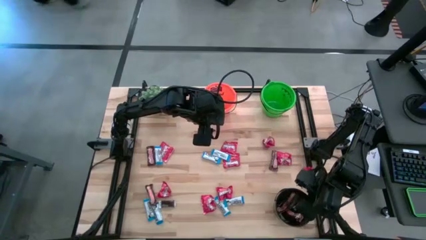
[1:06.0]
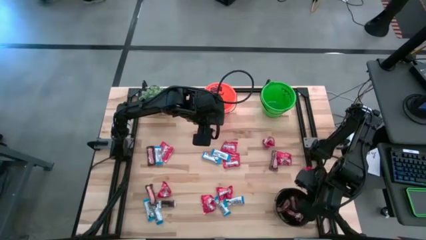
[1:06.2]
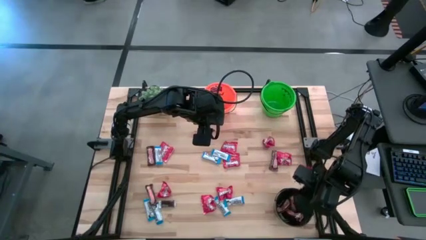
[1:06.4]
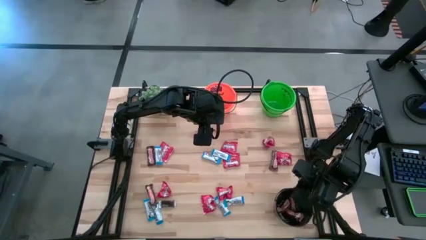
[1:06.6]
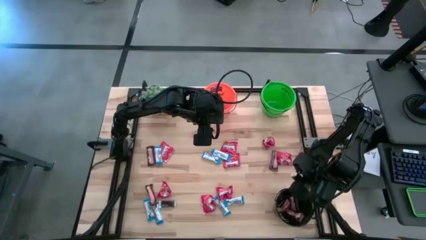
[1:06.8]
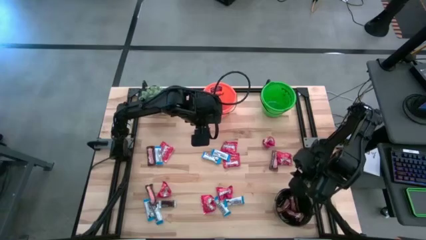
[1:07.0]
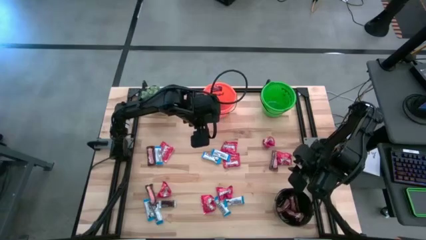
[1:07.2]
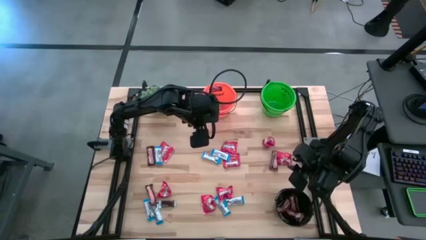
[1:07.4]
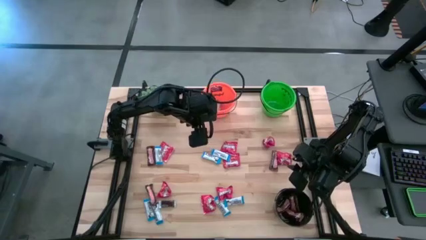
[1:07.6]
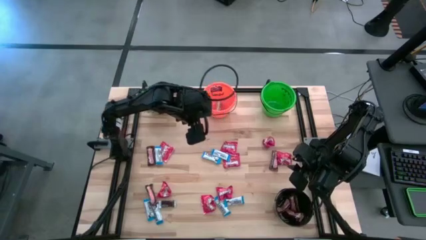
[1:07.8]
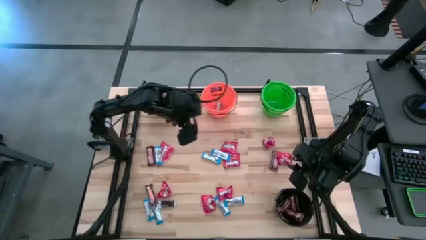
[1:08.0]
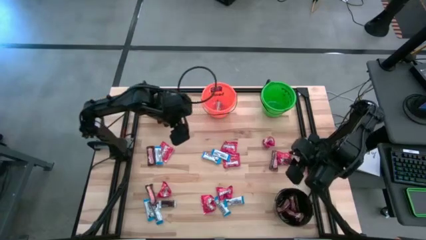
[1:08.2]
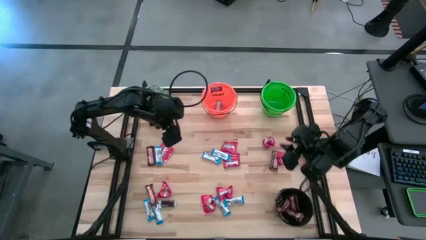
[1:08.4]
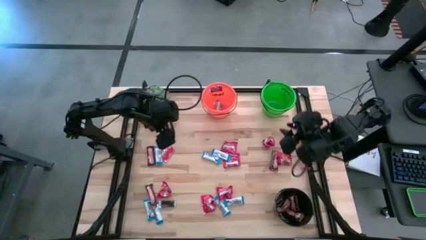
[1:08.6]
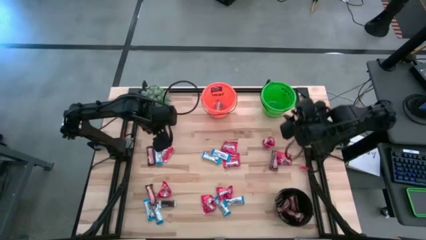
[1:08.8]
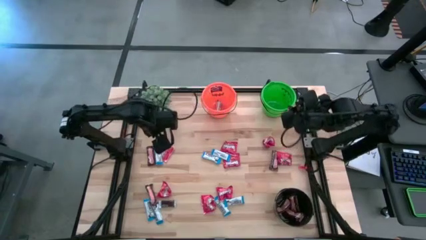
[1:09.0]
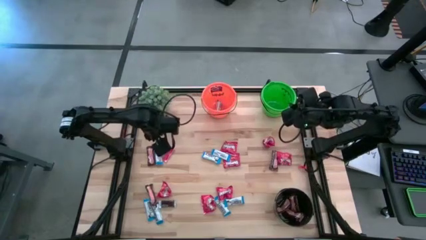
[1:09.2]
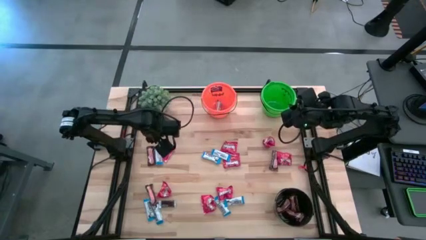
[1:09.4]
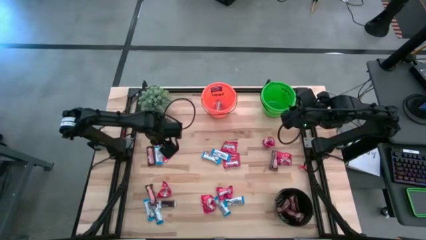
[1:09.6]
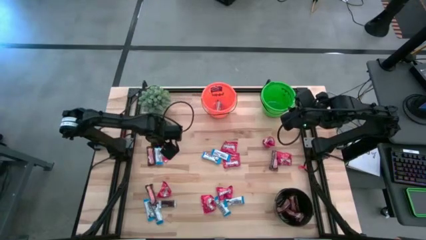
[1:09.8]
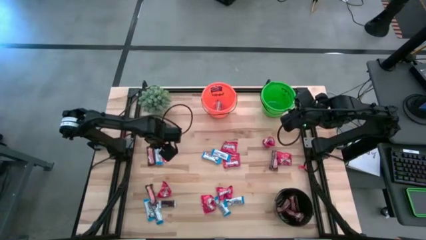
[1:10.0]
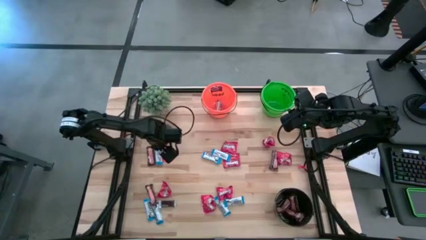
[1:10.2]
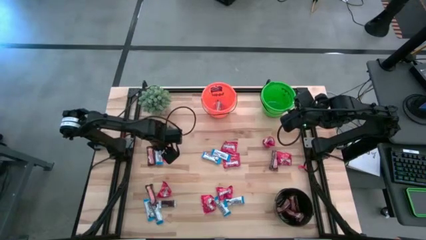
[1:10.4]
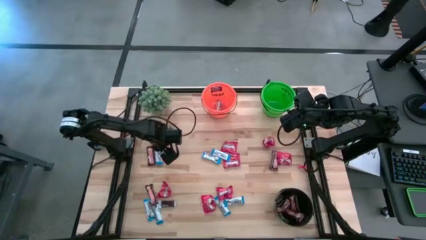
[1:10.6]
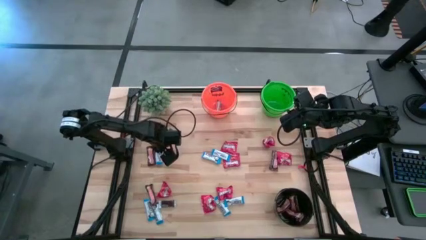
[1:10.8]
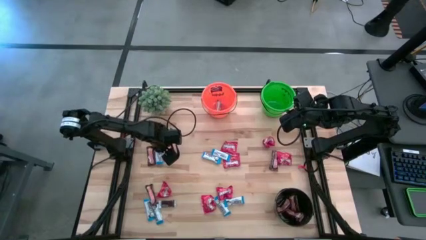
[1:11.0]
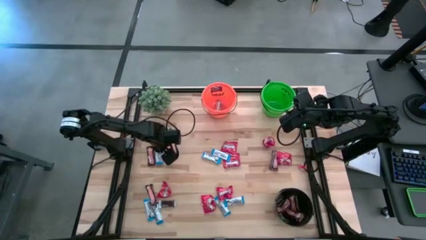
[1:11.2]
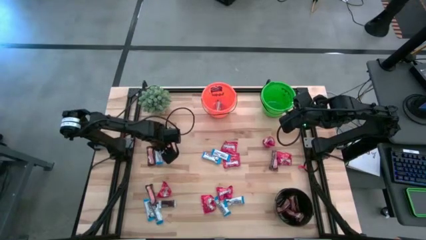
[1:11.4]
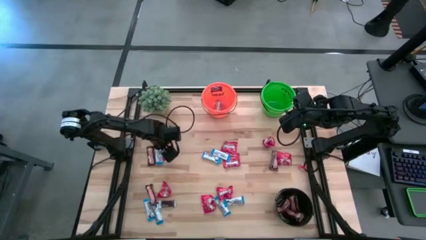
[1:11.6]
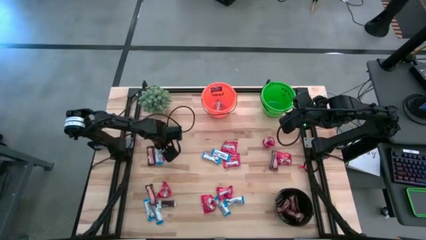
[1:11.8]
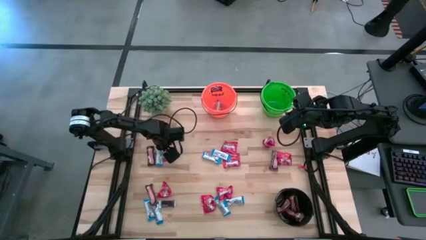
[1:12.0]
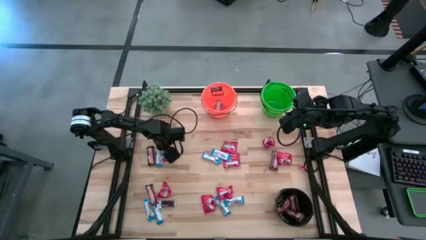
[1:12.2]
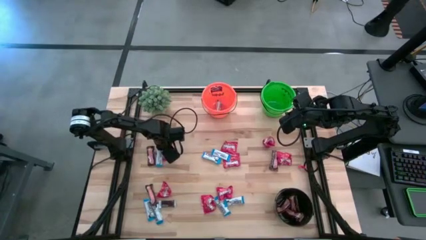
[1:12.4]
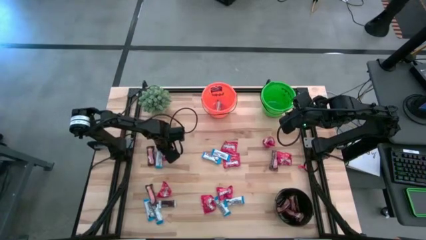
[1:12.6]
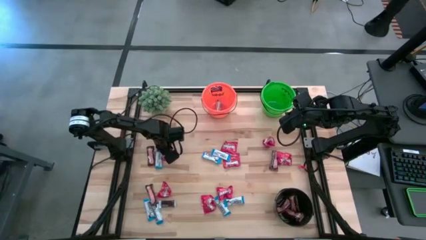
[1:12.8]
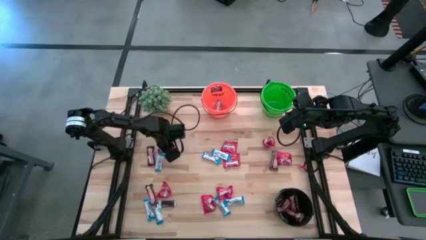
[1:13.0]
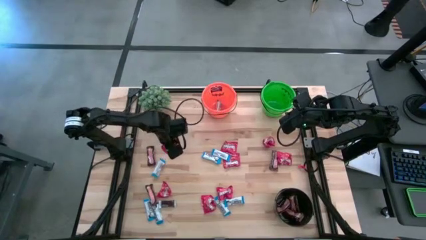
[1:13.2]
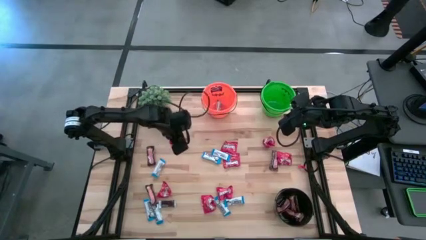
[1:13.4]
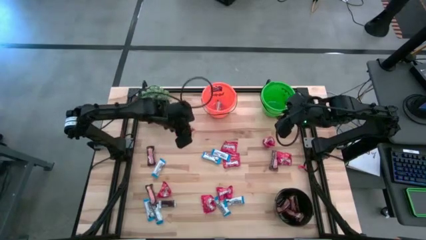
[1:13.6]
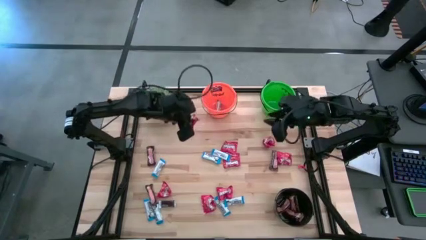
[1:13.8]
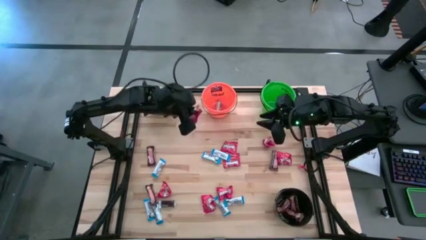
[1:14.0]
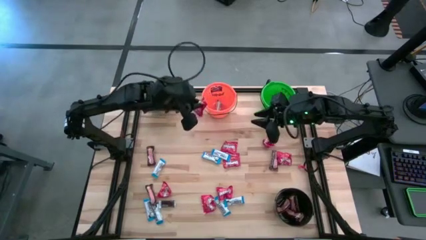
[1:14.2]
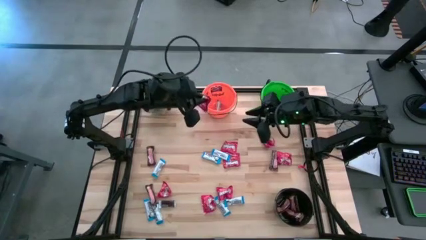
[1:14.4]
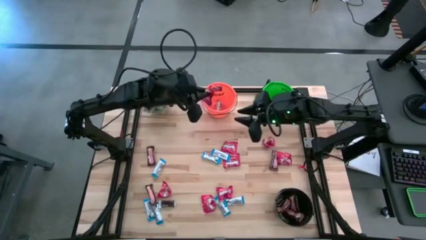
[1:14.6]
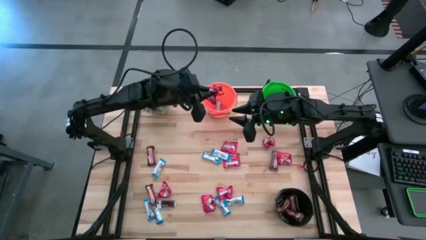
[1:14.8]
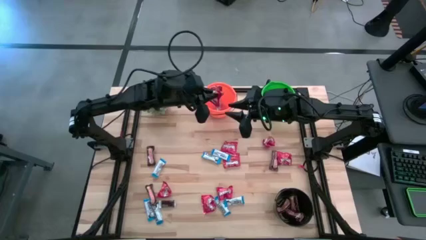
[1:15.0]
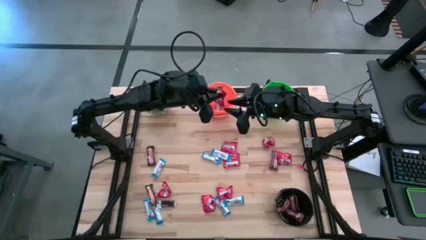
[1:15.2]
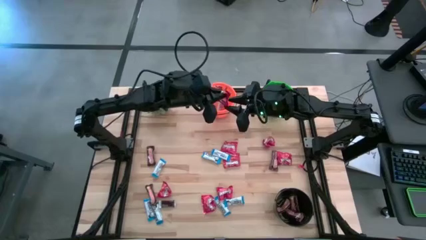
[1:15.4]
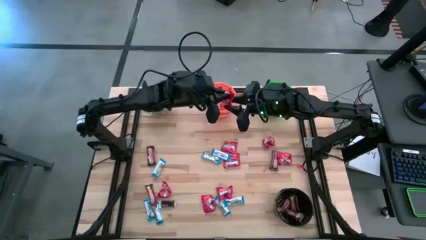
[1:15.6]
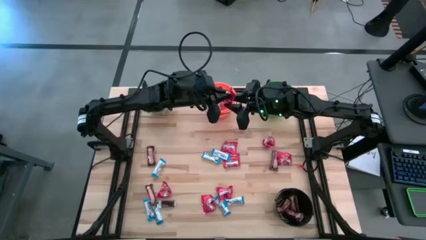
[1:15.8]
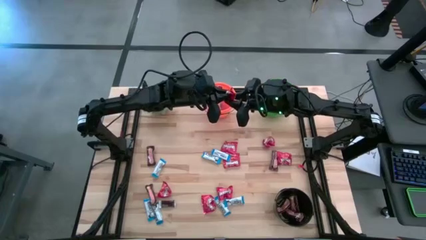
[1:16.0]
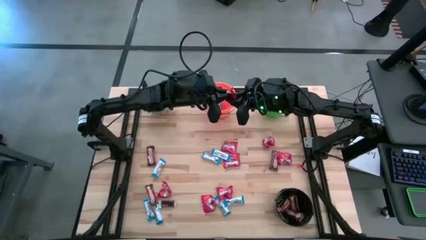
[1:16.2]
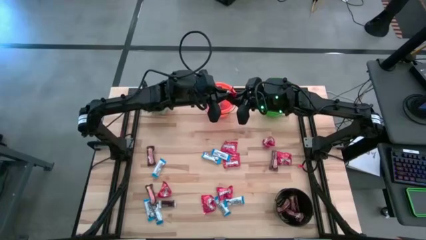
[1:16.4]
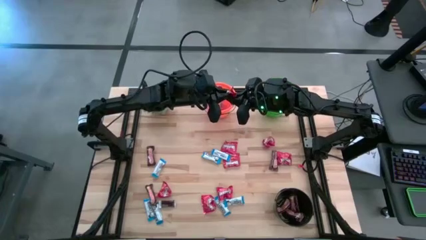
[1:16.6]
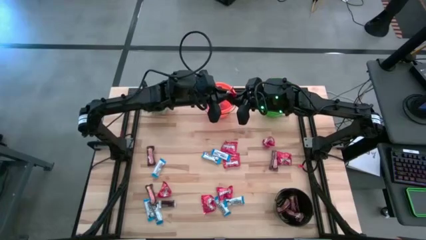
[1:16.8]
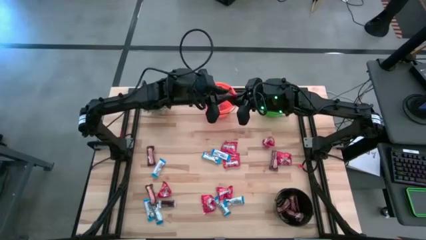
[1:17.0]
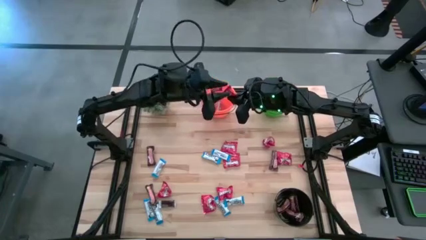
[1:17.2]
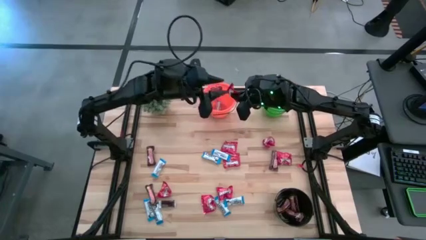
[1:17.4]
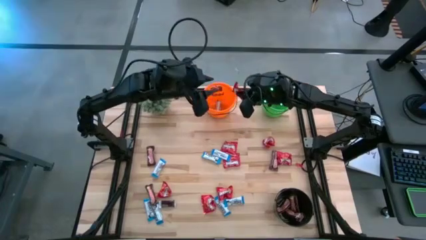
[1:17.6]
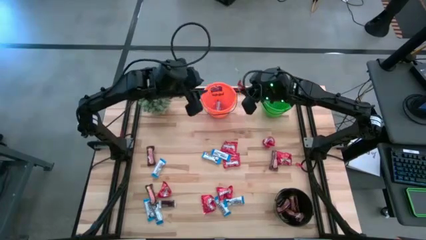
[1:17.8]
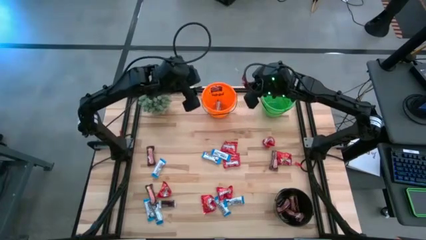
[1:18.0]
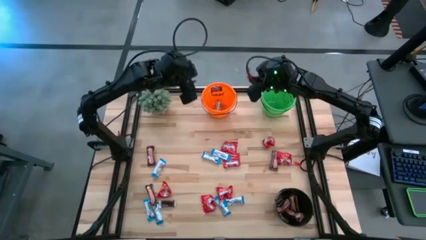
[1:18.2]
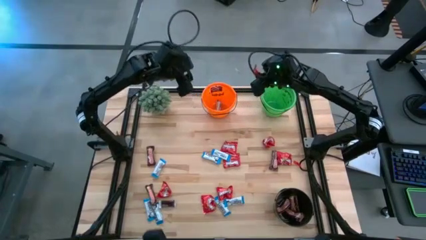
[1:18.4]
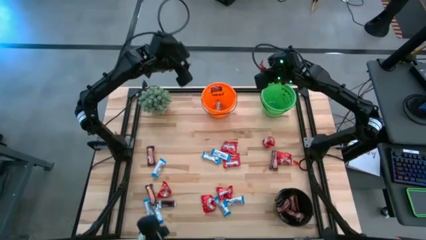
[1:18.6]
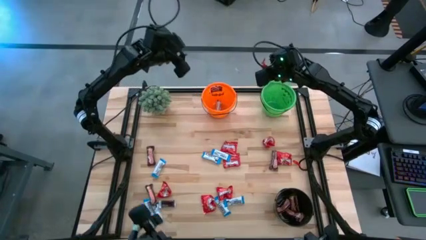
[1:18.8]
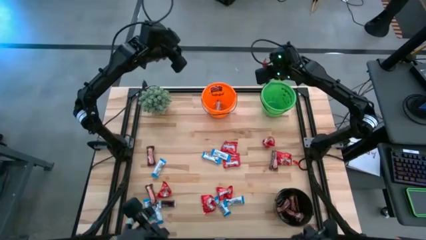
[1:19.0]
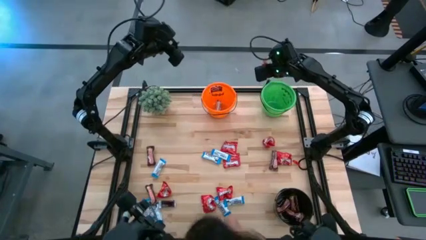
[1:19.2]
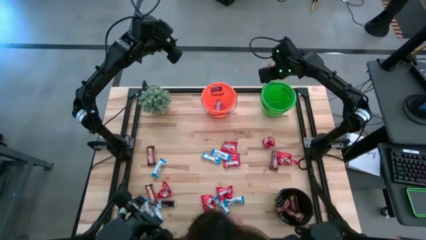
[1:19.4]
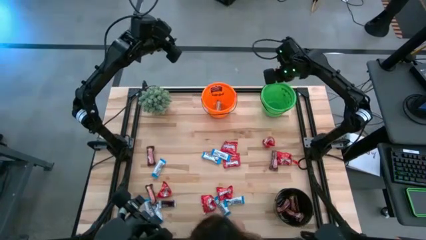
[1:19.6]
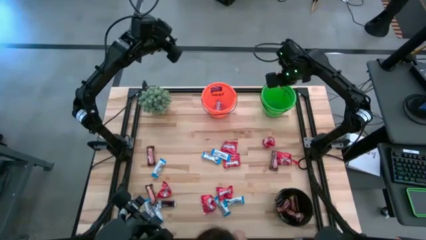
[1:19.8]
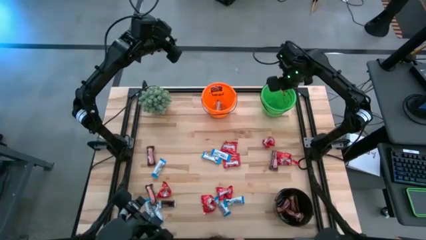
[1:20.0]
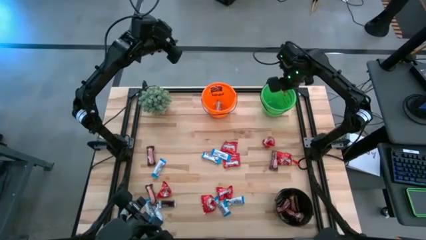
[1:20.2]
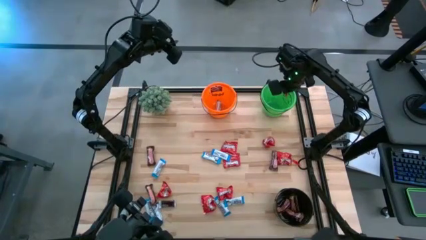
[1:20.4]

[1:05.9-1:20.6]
Task: Organize candy in baskets
Put the red candy into the green bucket
